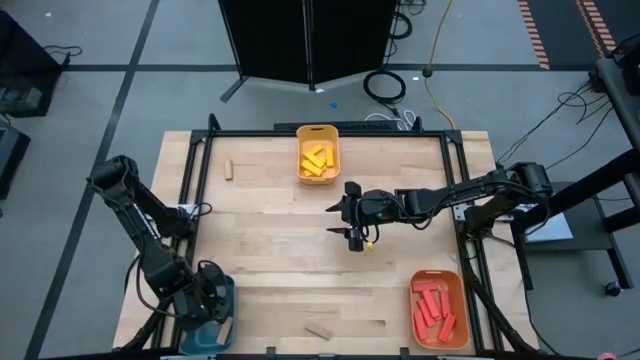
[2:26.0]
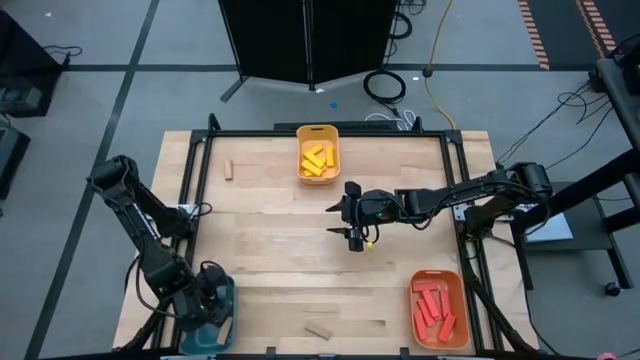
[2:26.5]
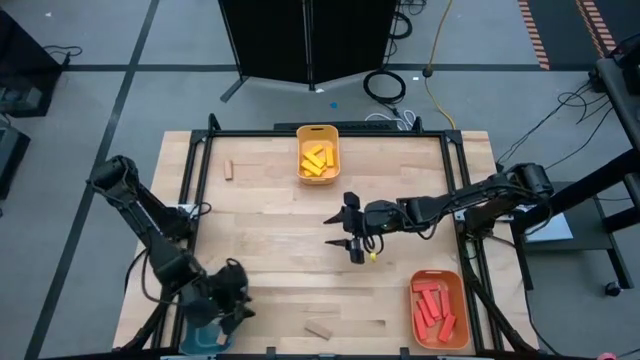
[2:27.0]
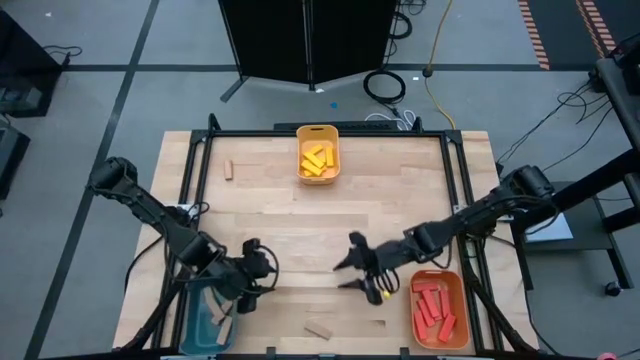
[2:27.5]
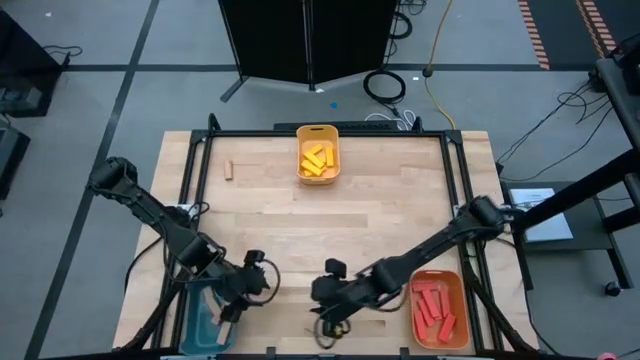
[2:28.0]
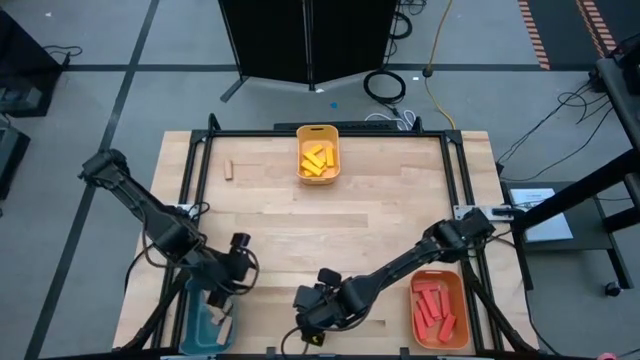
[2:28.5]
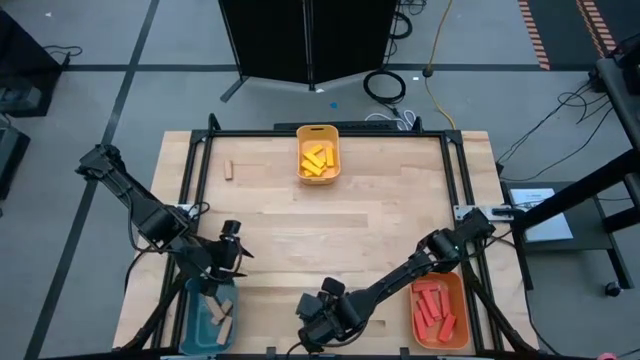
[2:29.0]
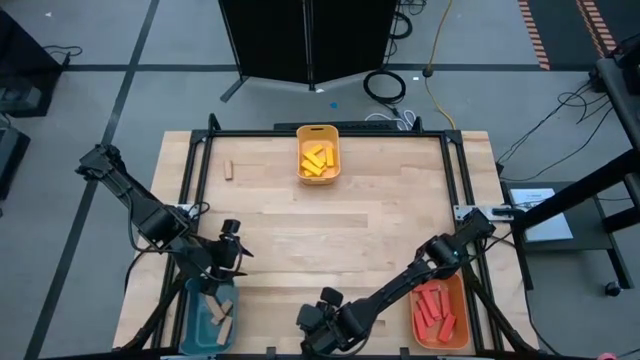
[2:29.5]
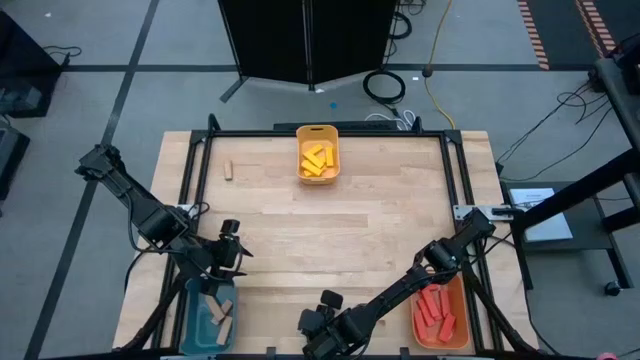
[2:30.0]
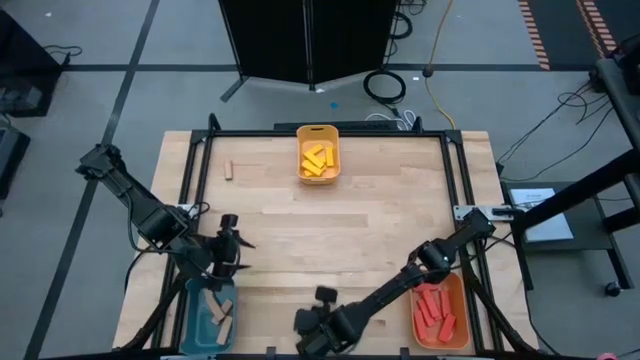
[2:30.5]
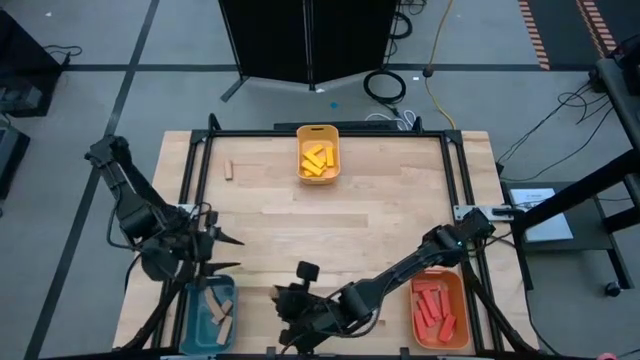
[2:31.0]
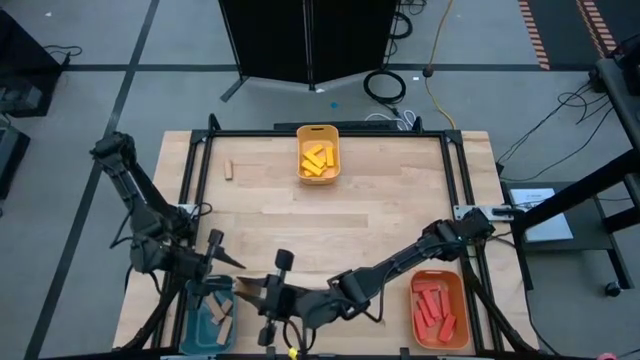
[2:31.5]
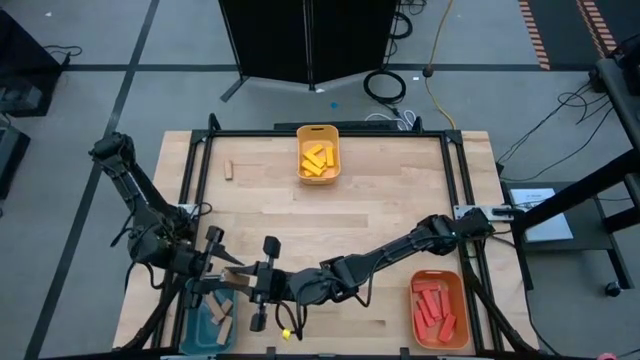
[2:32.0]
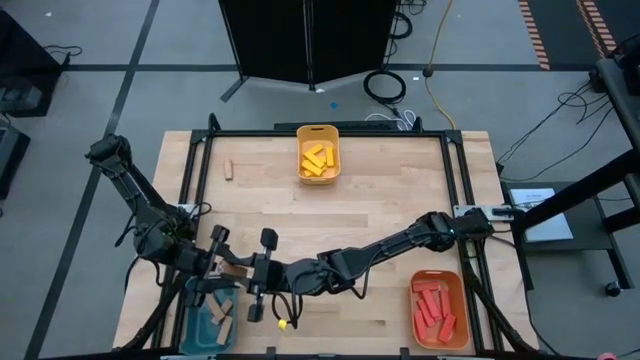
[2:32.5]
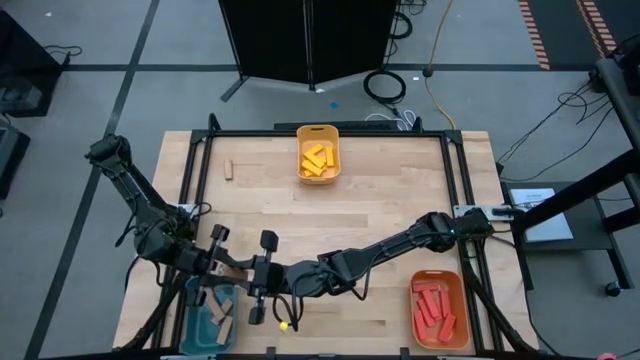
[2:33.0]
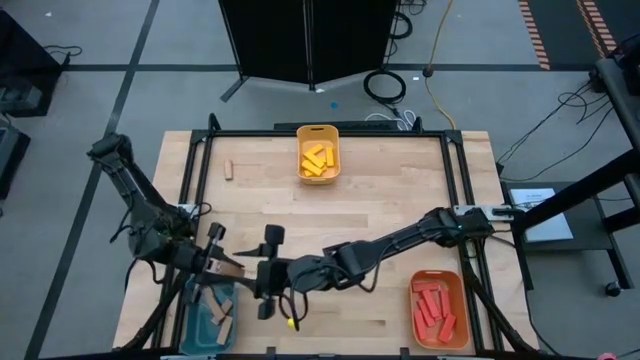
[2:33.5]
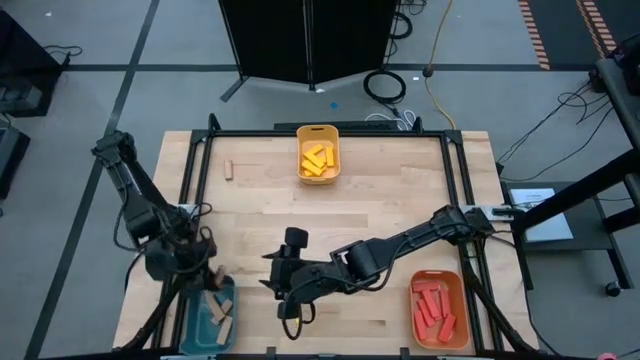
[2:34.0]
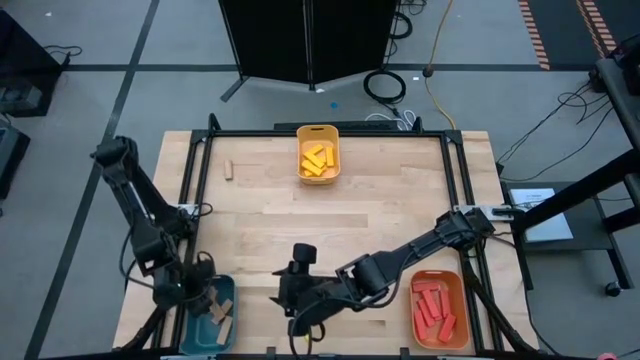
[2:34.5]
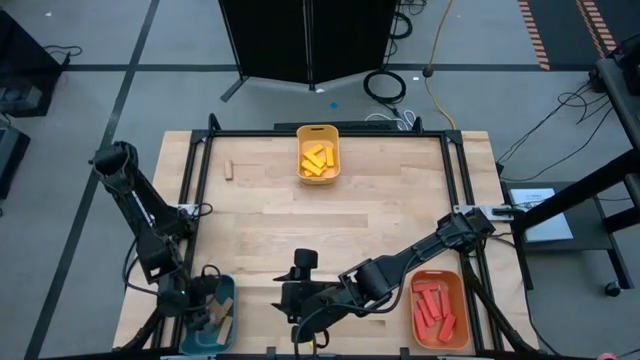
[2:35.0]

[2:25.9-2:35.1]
Task: Sort blocks
Put the brown block into the blue bin

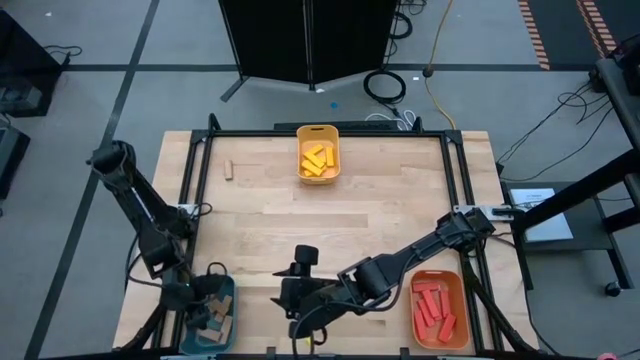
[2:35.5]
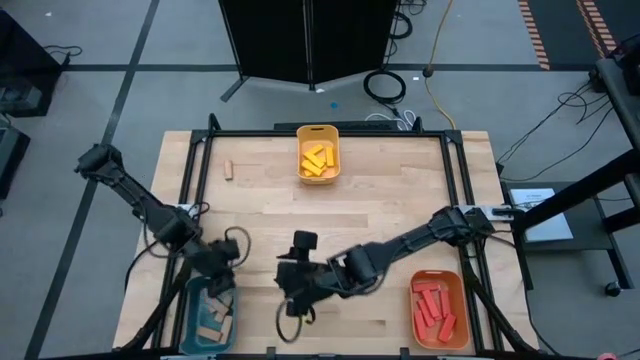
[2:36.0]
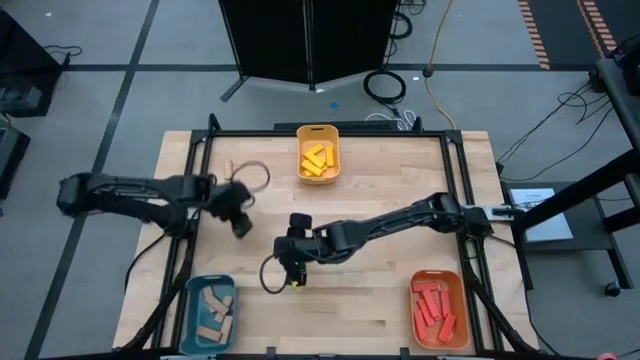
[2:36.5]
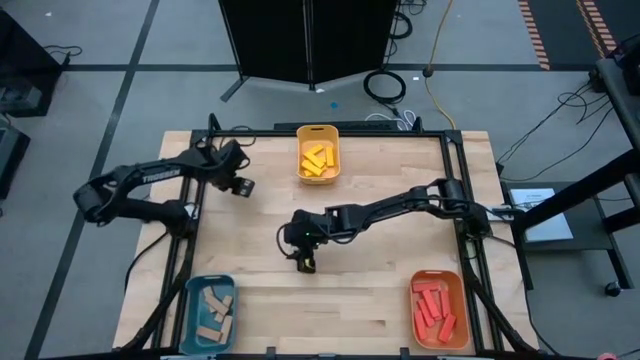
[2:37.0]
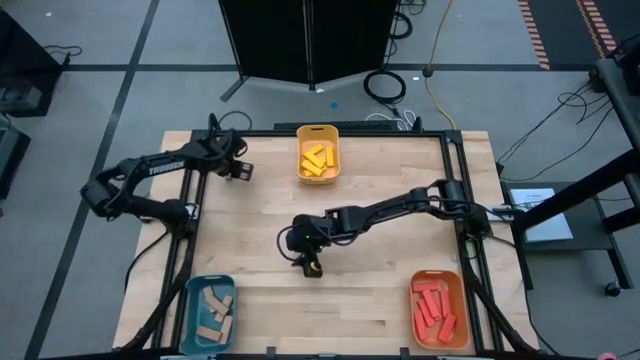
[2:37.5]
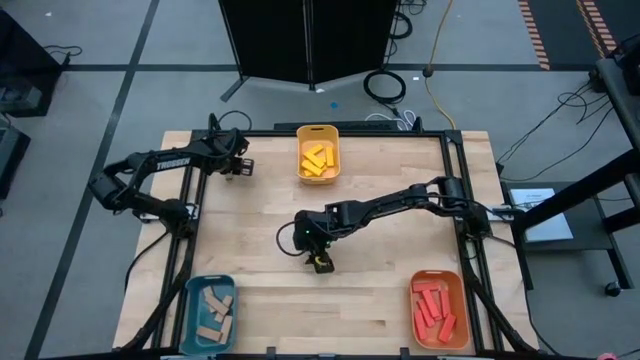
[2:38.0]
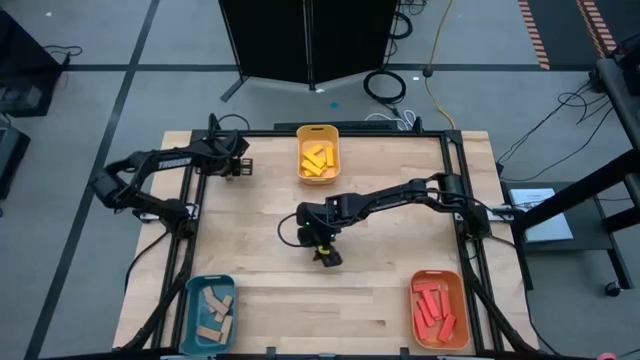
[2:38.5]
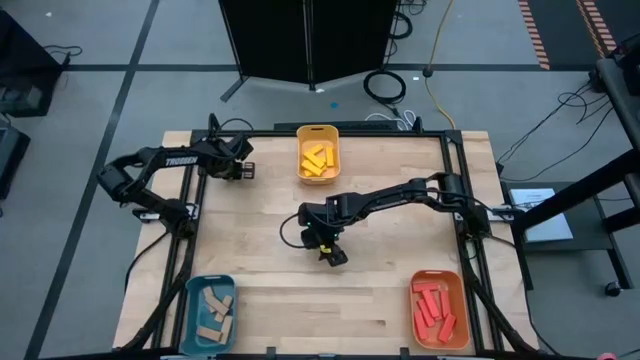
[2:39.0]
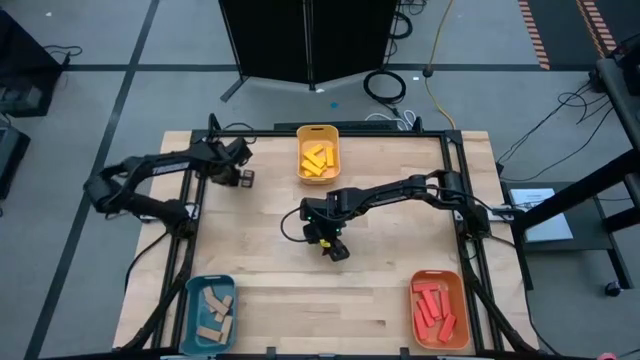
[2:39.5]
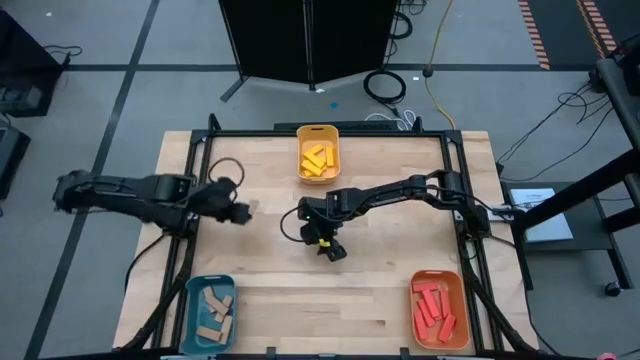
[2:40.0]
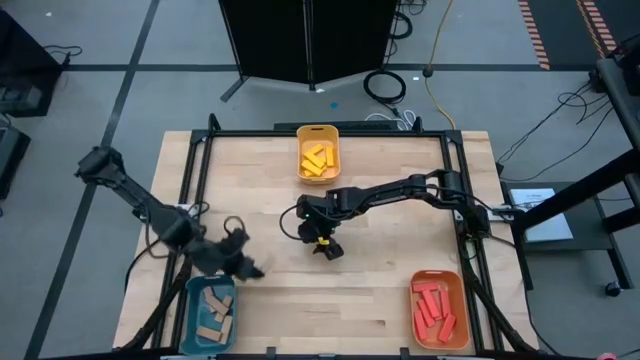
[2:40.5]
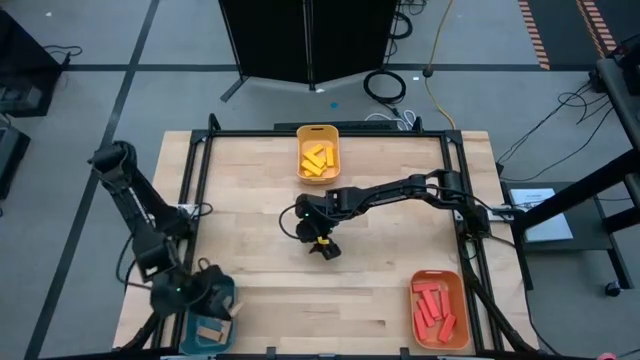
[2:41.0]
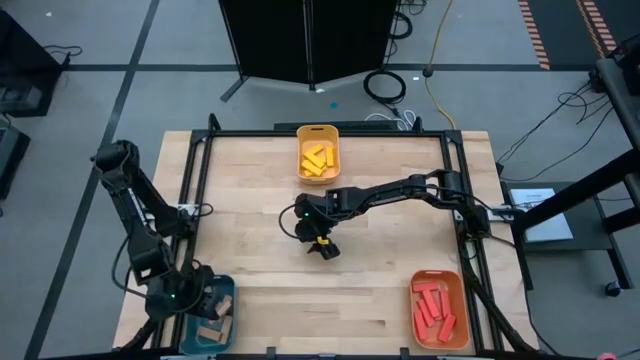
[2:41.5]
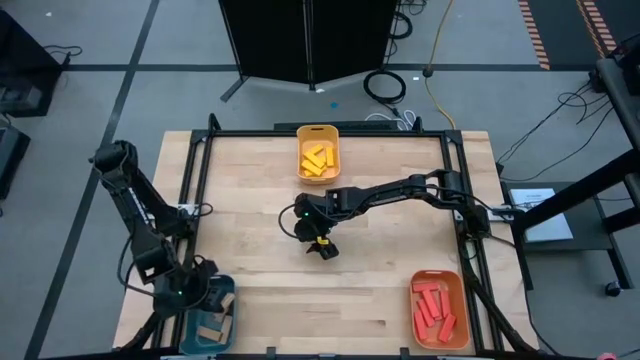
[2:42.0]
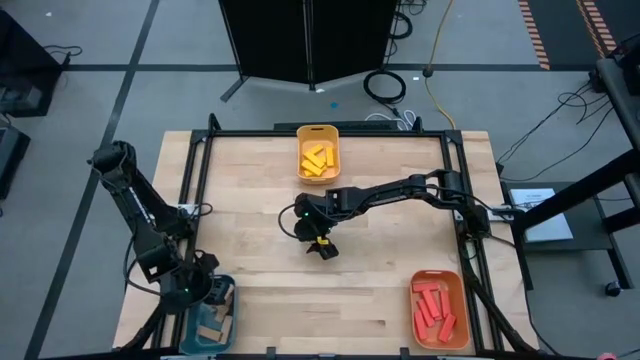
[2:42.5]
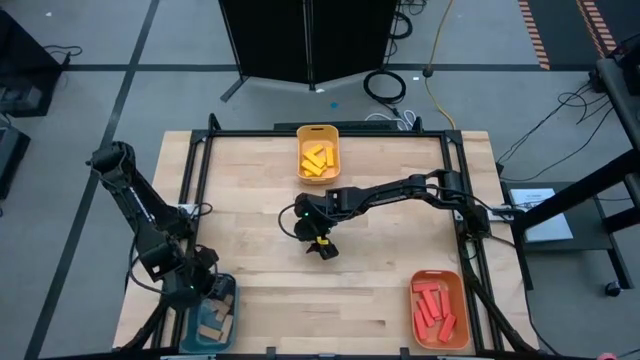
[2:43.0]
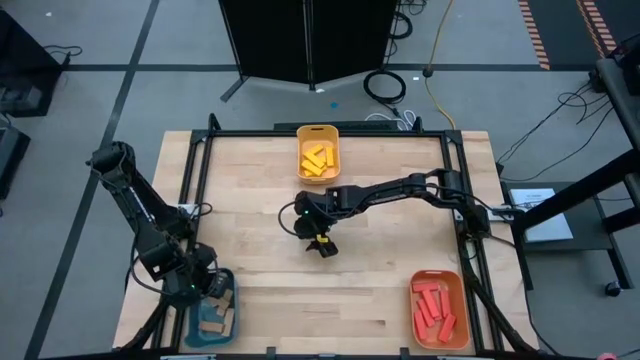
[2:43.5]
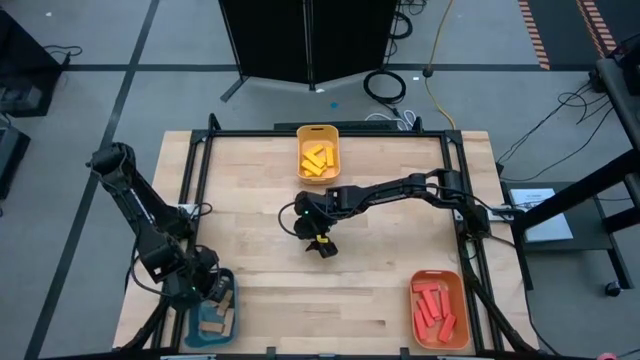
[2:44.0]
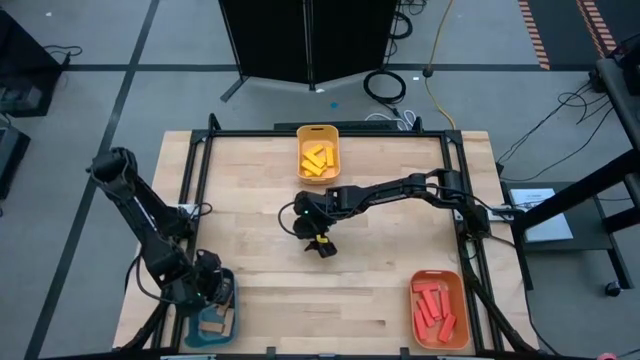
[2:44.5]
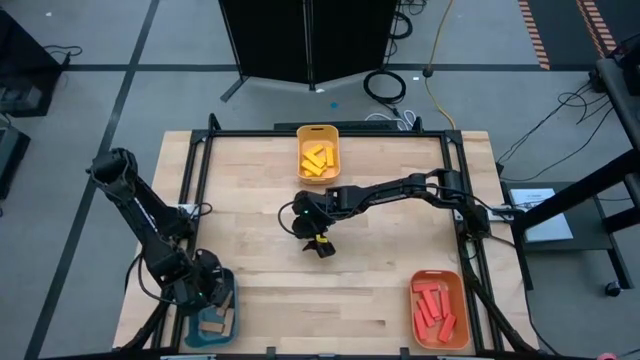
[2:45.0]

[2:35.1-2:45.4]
Put the brown block into the blue bin

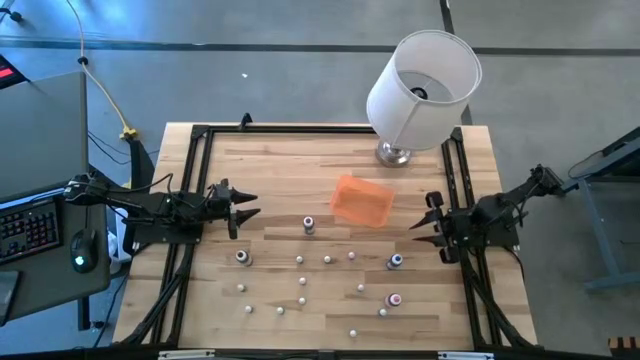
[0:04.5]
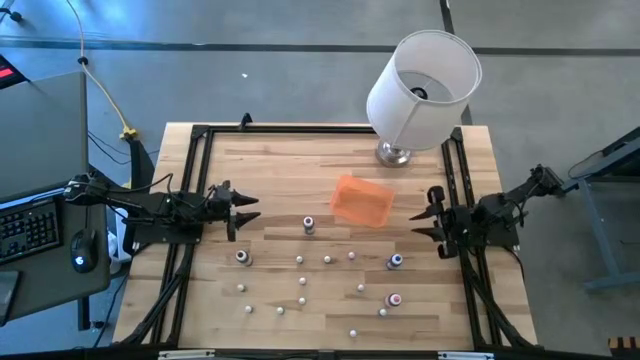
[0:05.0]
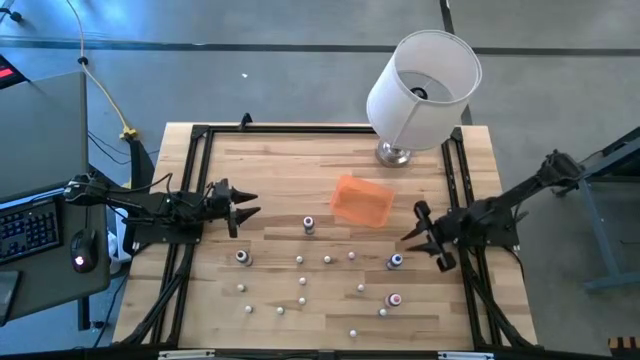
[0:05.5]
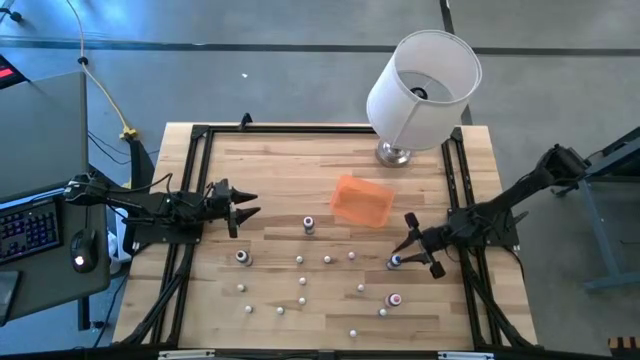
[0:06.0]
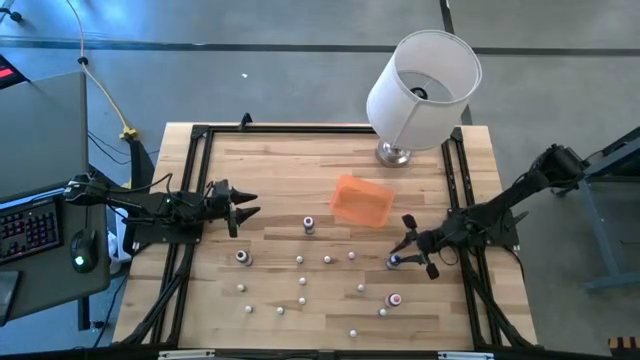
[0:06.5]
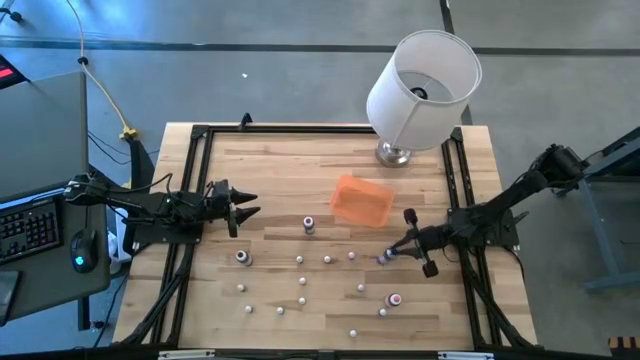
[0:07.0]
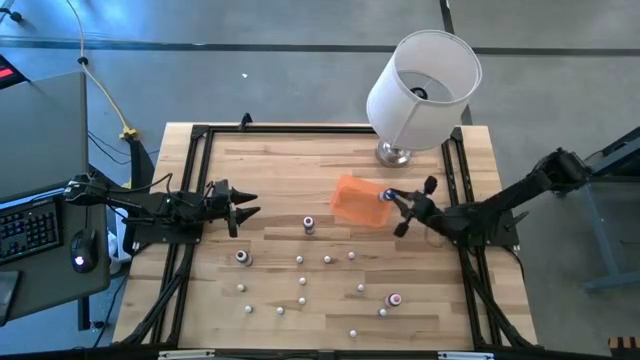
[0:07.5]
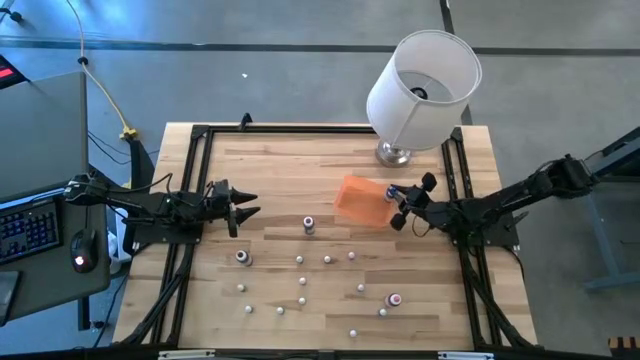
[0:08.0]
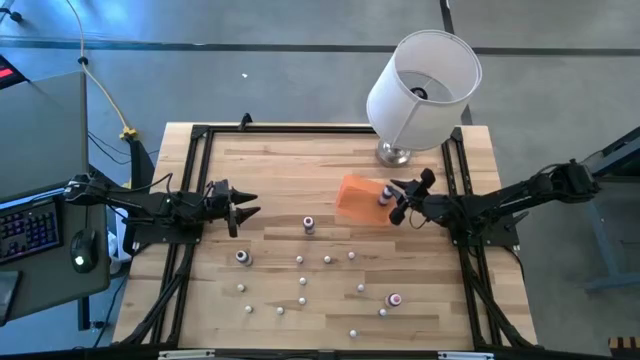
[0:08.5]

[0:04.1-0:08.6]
Task: Pick & Place food coloring
Put the large blue food coloring bottle into the orange container
